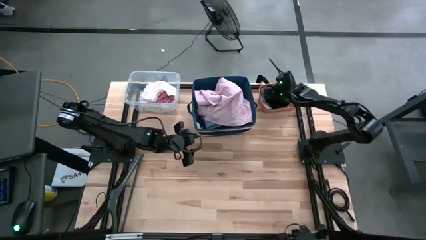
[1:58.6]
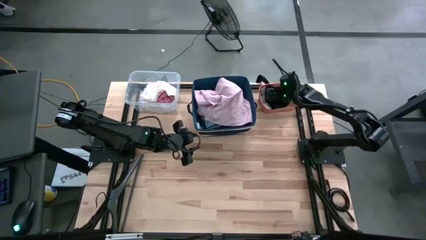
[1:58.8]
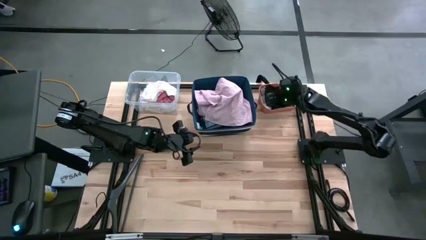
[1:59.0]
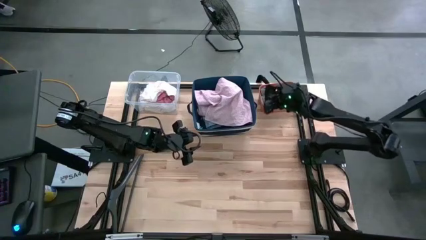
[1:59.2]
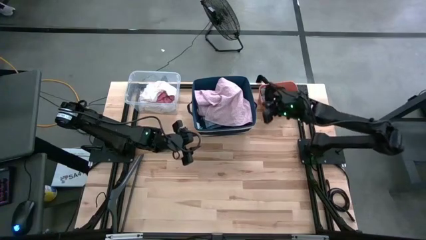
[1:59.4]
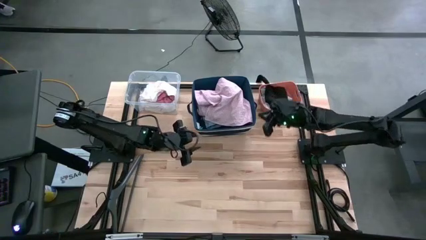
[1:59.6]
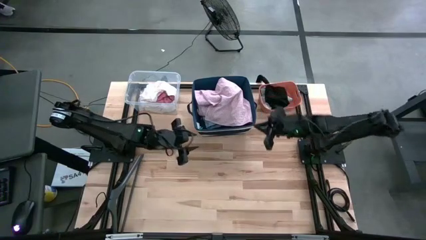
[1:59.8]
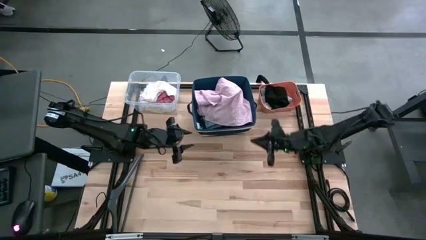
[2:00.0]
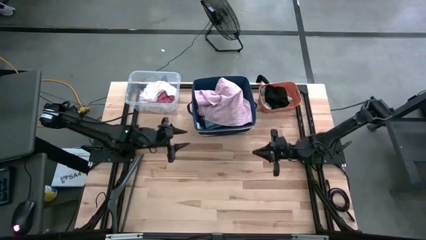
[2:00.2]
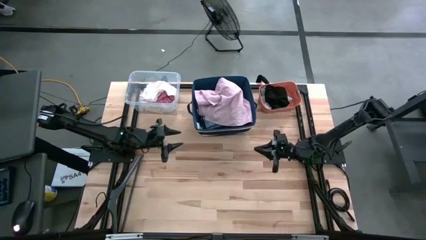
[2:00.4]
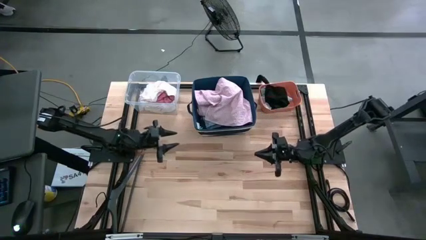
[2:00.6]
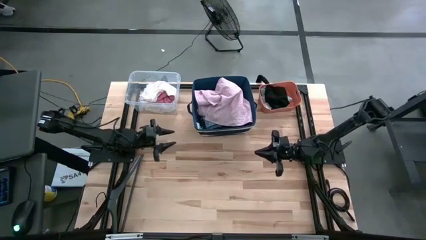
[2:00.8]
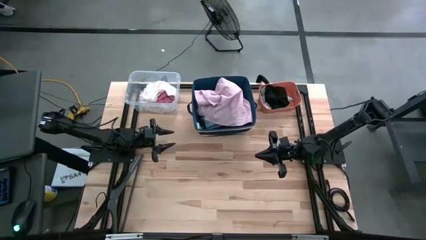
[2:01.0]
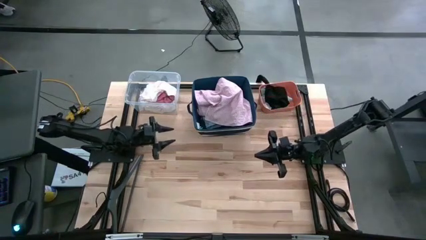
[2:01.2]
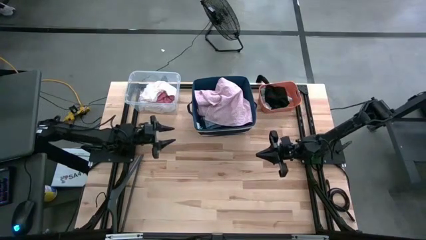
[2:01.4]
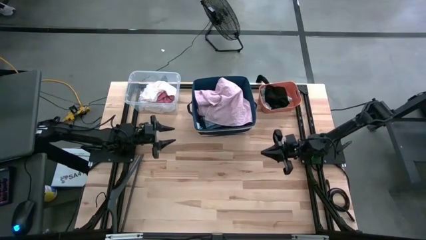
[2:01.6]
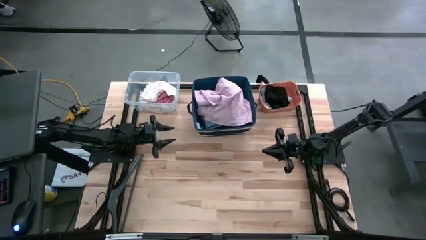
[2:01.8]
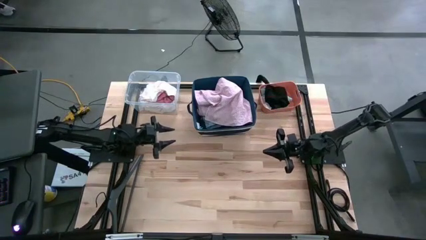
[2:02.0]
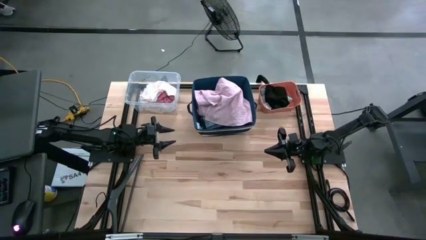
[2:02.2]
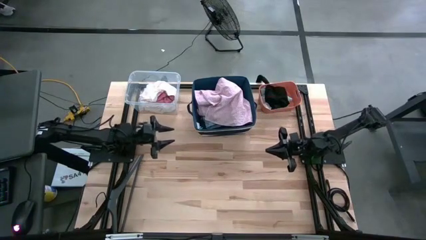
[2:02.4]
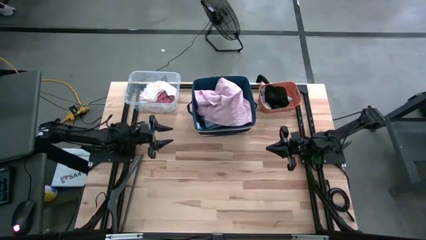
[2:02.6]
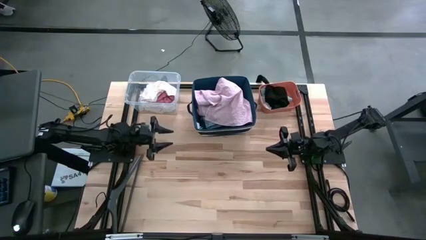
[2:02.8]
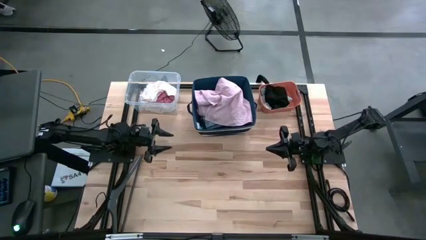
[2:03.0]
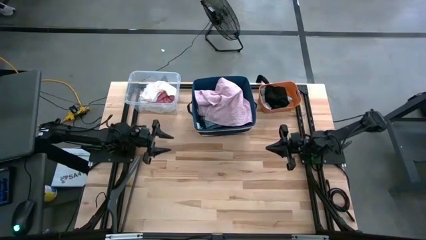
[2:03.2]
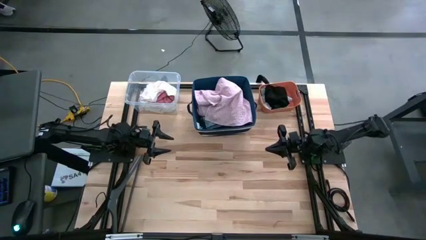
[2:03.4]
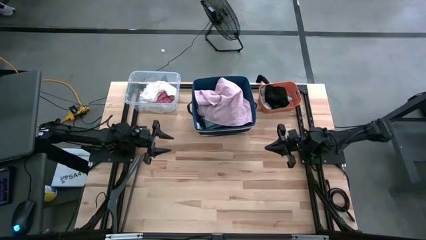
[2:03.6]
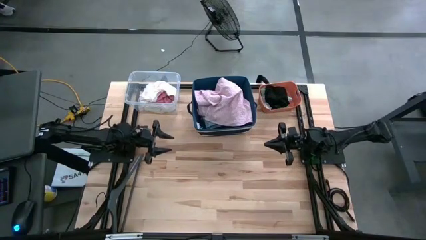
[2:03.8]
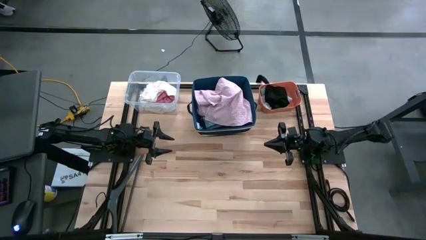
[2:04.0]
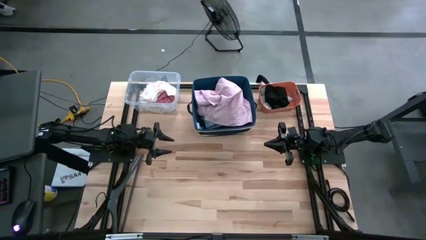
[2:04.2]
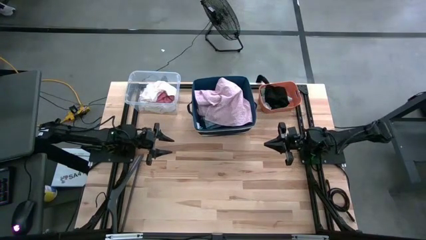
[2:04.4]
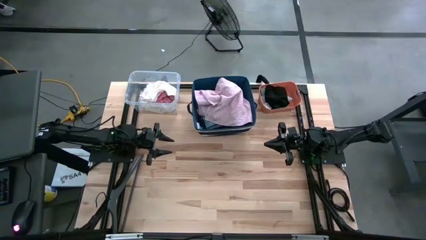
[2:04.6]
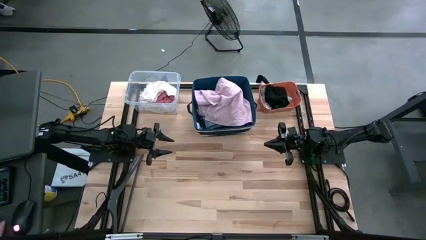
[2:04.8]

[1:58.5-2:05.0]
Task: Pick & Place Cloths
Return to Home Position

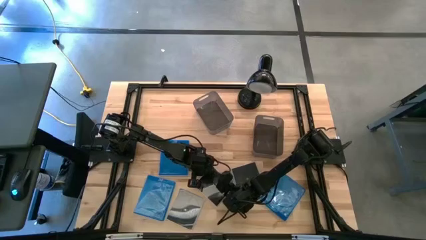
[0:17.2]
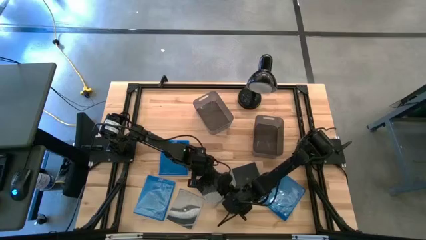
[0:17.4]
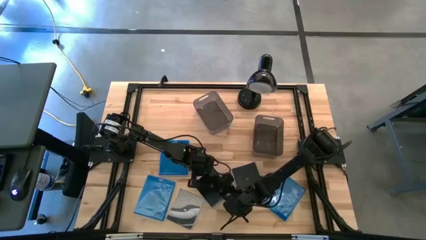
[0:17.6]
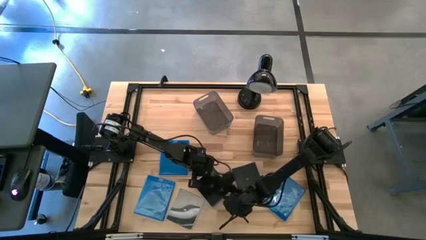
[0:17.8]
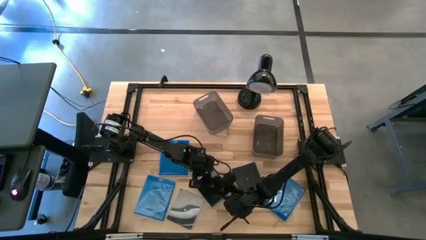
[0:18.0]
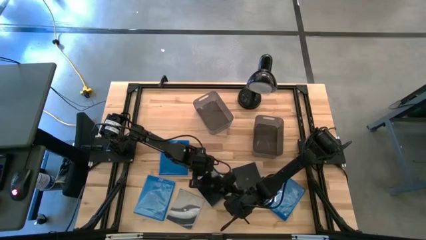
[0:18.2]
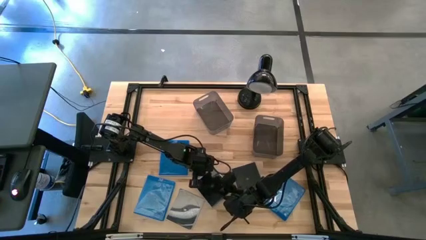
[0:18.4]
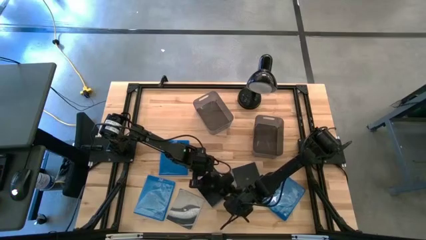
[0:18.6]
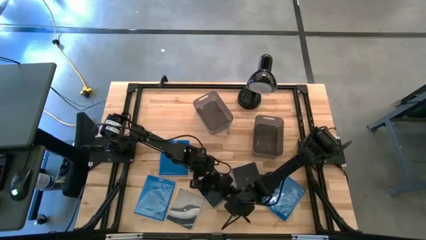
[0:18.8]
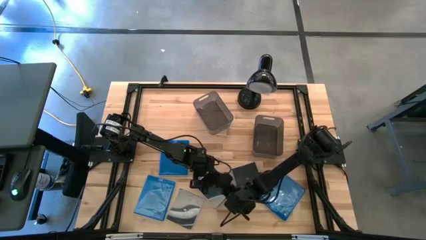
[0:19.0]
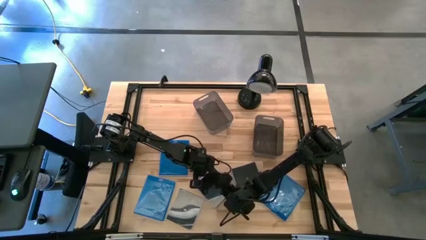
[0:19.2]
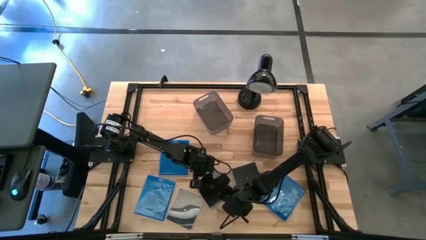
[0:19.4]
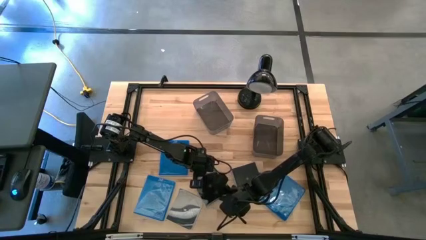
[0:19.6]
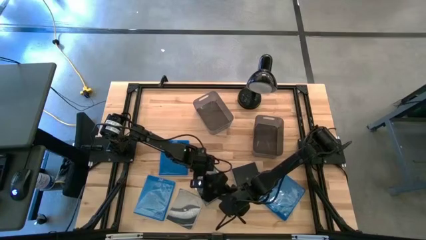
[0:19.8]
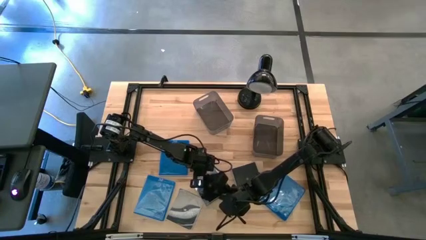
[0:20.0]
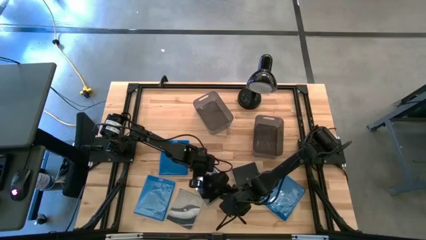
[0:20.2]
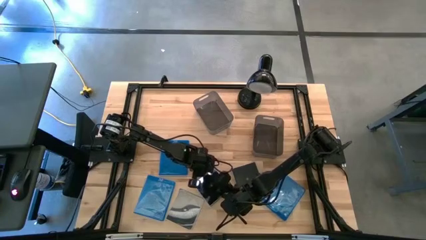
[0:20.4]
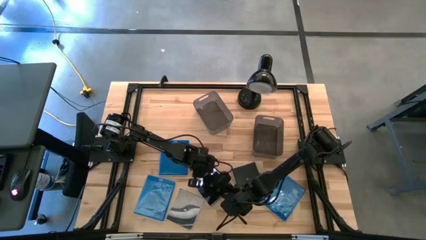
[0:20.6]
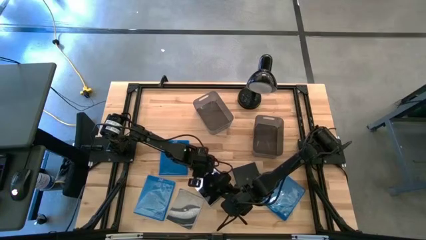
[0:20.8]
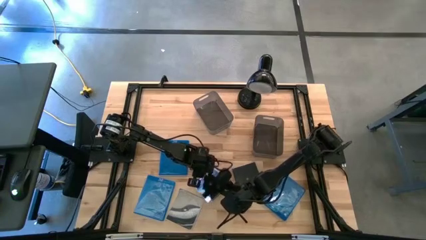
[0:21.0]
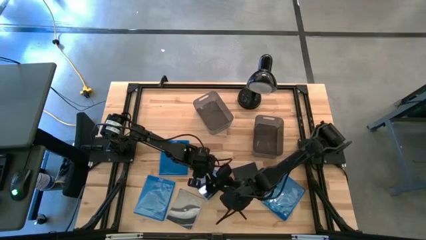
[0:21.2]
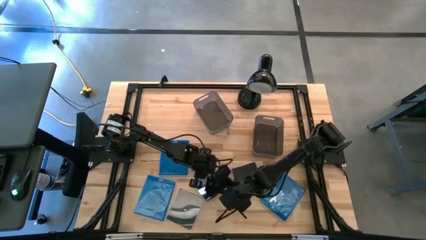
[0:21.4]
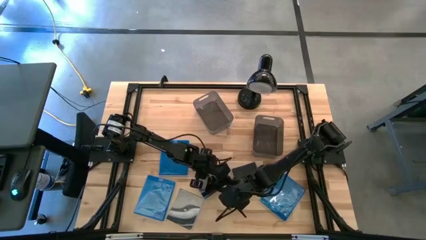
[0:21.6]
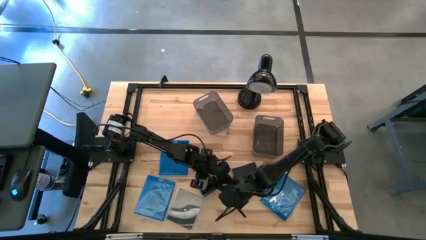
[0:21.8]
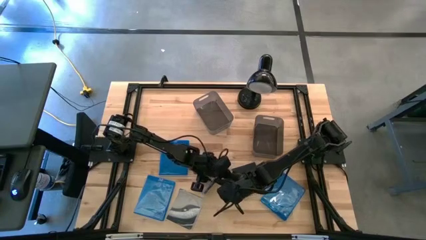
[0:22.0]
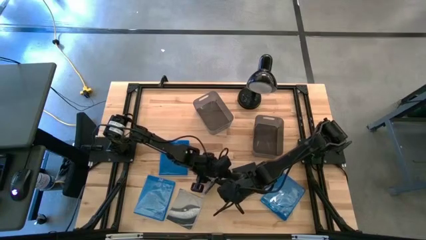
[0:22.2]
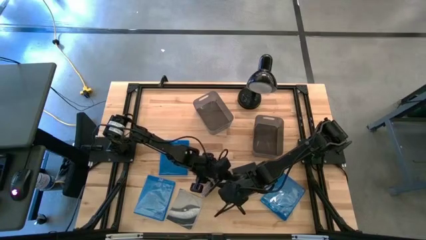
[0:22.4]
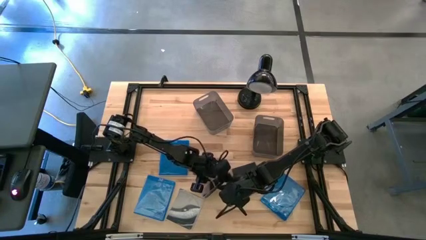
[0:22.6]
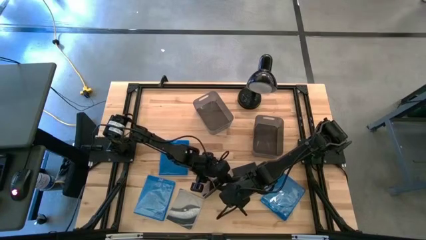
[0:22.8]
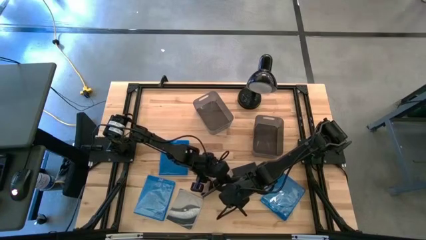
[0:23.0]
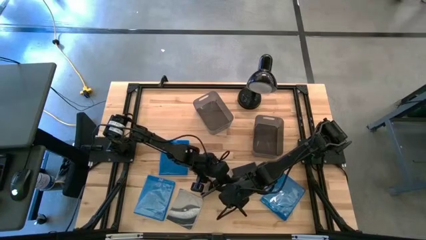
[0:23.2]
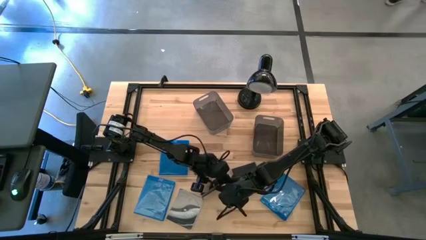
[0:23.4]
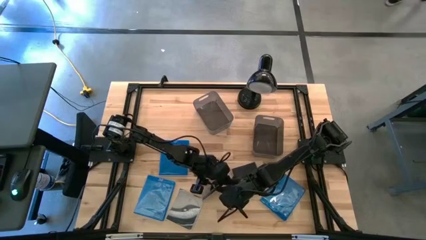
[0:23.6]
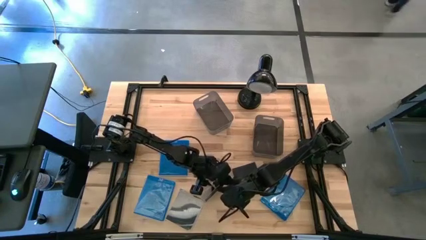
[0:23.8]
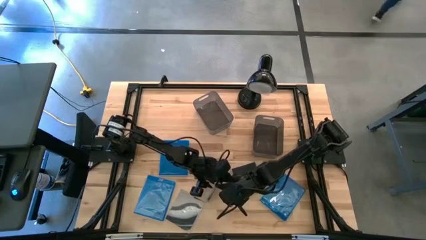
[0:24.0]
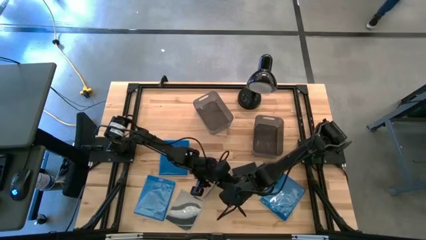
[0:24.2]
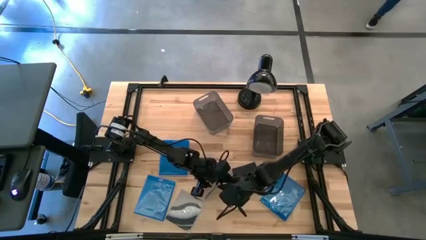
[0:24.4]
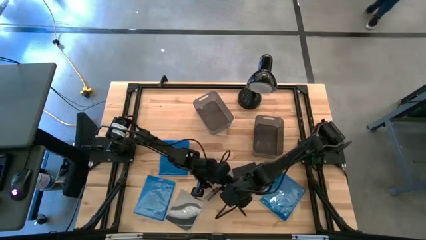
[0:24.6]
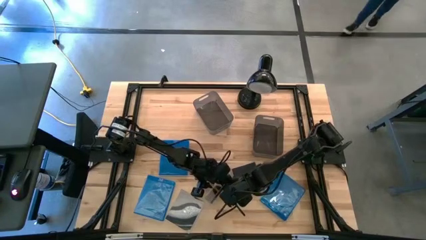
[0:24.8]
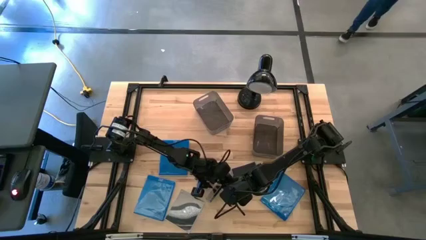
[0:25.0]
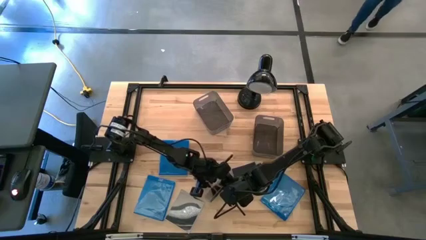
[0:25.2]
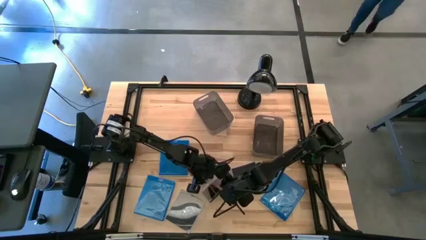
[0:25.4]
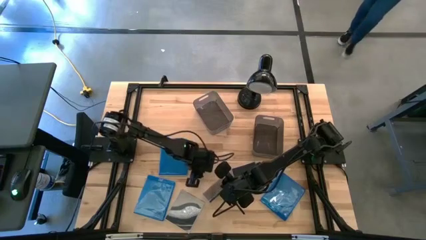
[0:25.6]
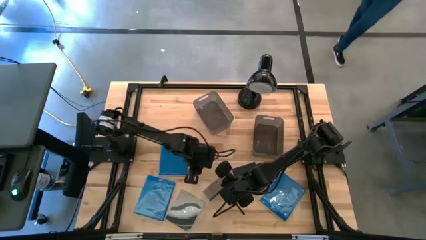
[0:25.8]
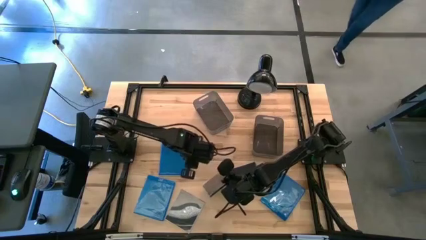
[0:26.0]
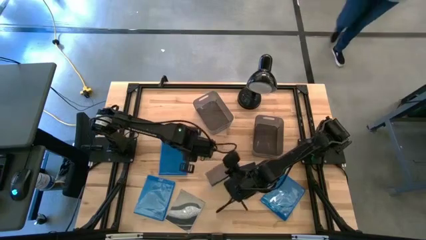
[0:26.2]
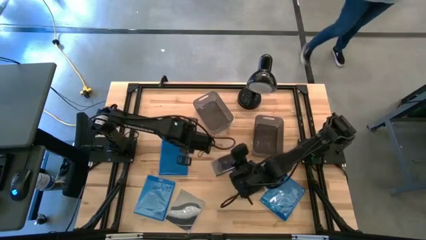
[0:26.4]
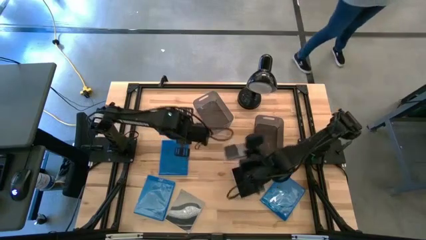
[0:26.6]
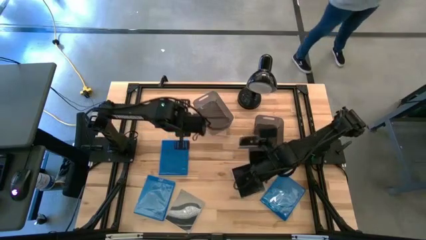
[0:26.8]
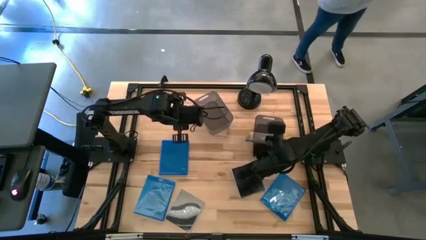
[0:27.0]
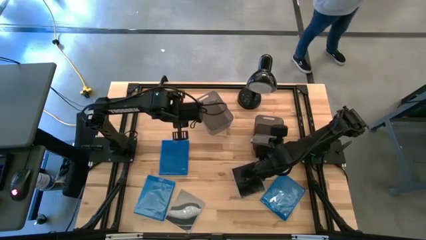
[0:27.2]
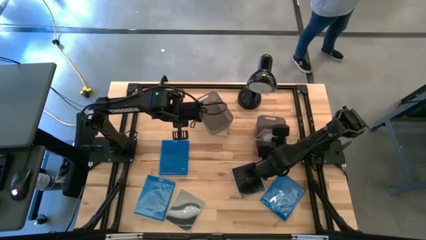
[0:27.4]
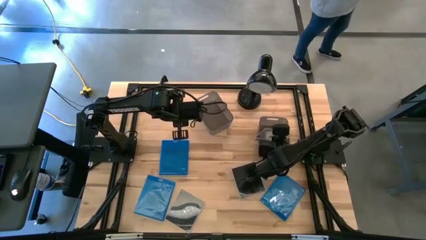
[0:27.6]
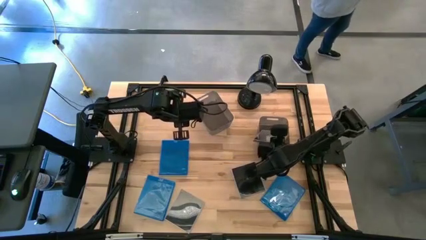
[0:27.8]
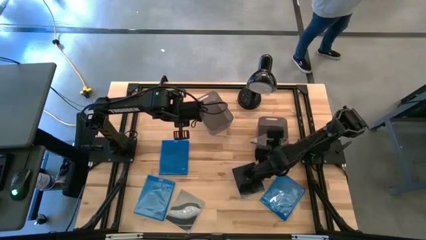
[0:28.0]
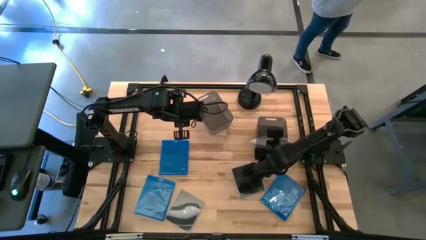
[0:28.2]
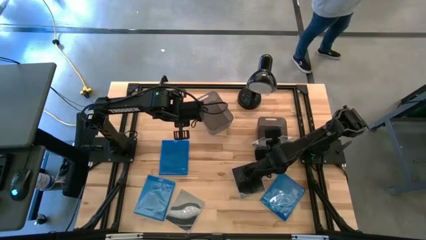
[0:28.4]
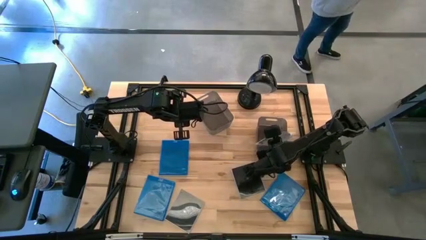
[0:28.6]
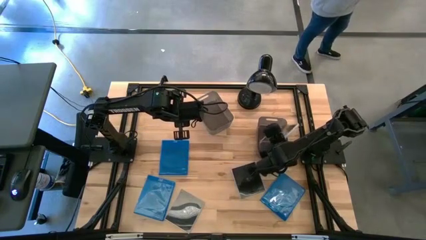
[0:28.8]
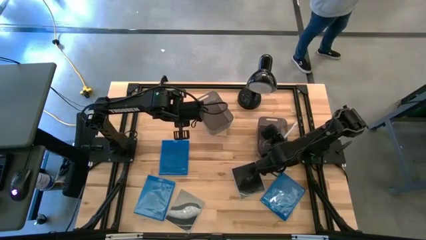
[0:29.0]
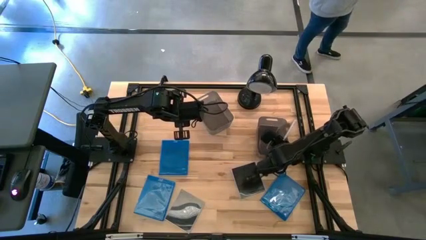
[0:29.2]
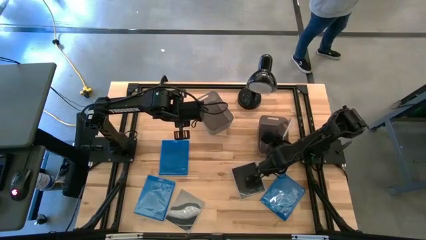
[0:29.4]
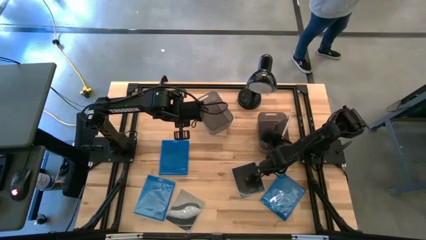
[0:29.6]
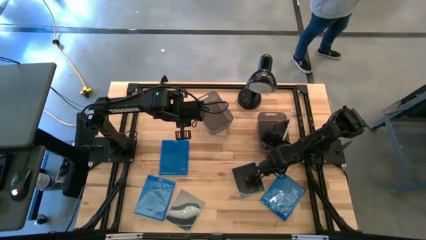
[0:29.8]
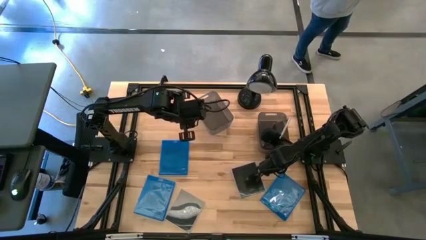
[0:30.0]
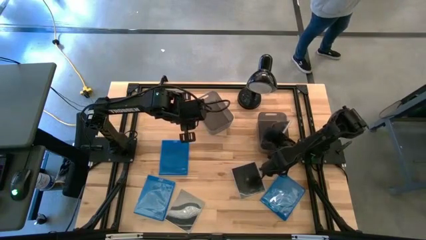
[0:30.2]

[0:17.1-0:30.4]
Task: Pick & place jewel cases by type
Put the middle black CD case into the right black bin
